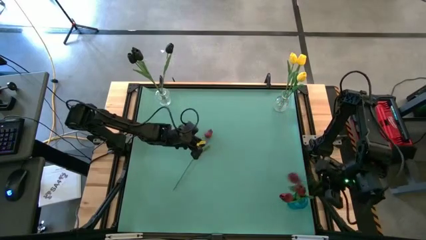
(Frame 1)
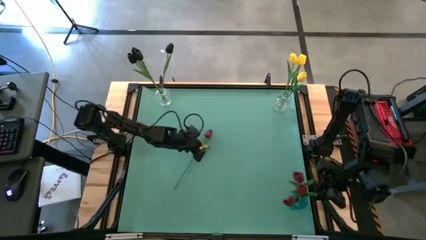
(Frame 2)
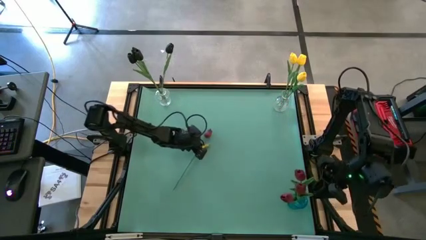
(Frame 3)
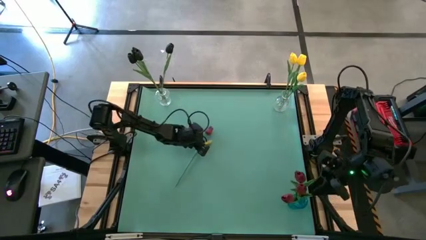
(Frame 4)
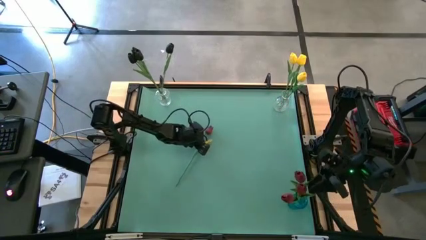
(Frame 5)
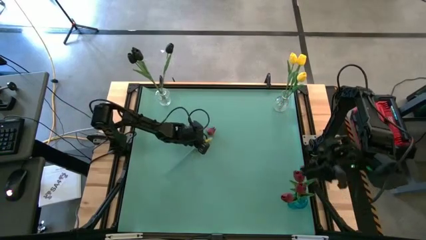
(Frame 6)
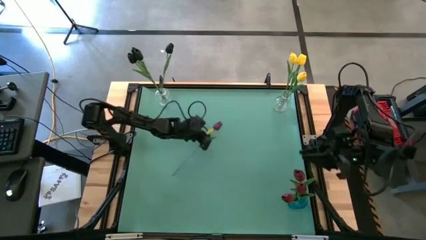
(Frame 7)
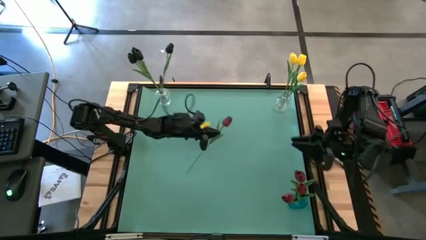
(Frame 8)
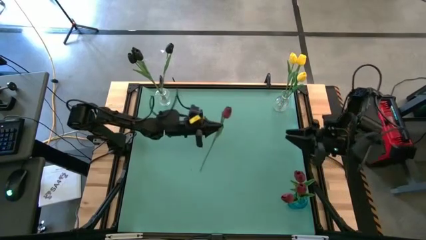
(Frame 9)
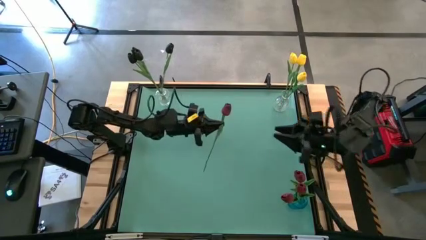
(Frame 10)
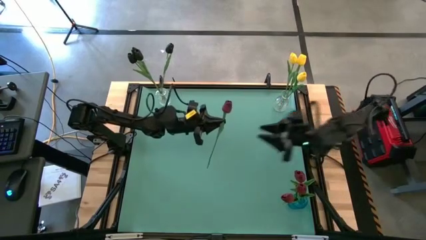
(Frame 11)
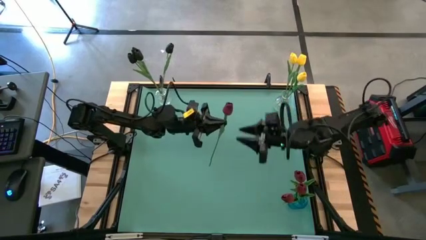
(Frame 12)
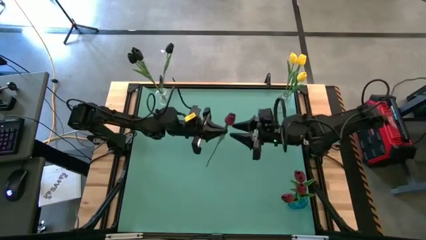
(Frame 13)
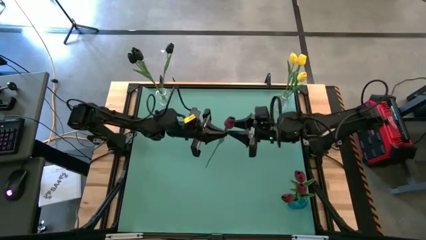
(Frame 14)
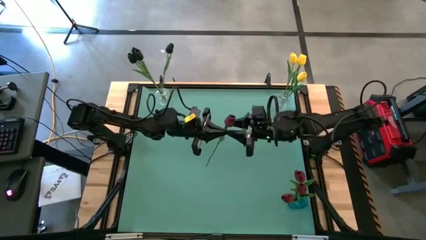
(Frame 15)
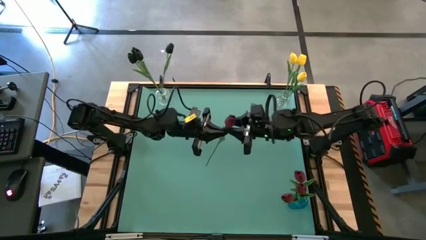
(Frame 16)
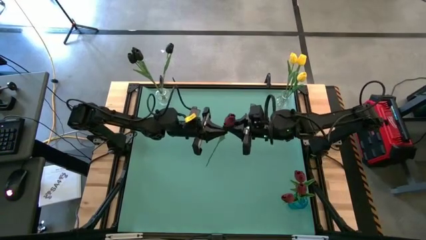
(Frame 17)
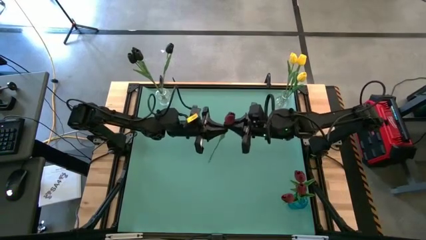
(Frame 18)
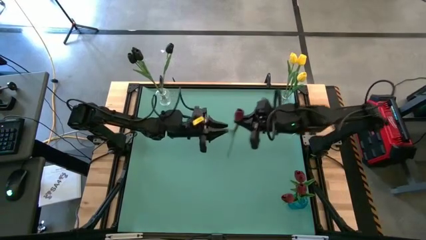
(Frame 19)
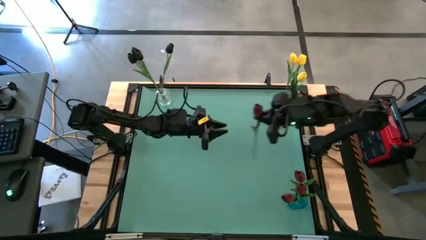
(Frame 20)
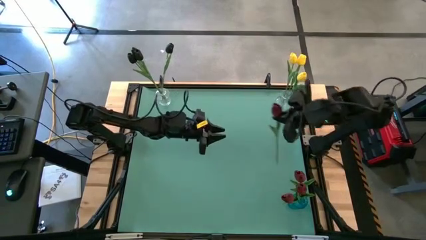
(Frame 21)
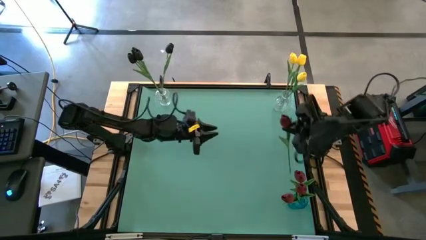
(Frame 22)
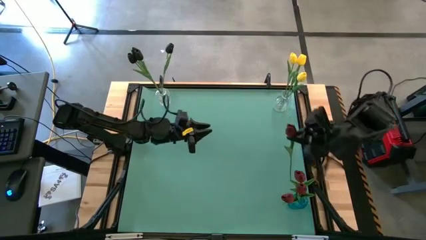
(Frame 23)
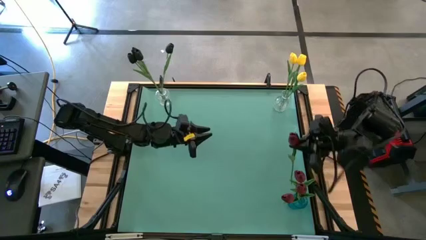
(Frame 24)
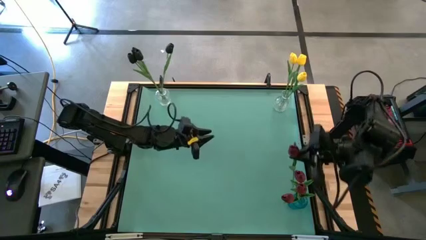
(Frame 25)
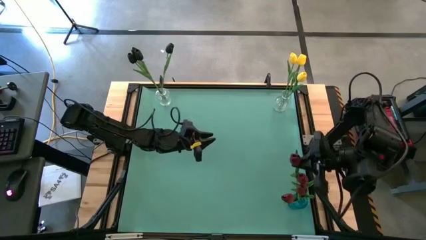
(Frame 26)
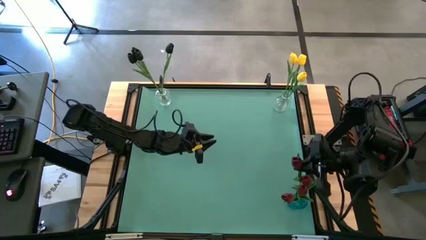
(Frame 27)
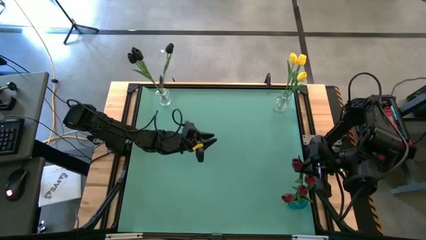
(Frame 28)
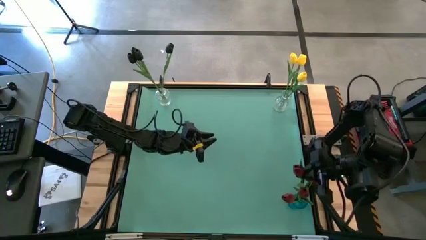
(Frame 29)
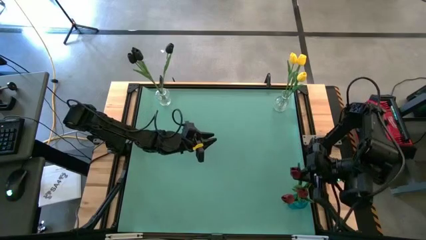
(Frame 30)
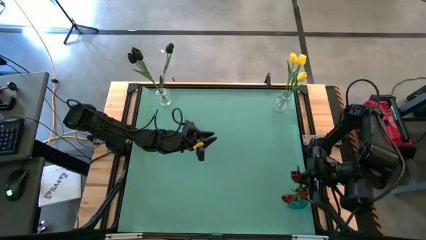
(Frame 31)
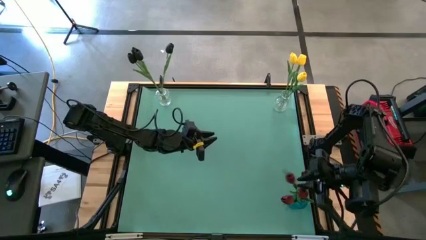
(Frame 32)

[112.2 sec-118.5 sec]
Task: Sort flowers into vase by color
Put the red flower into the blue vase

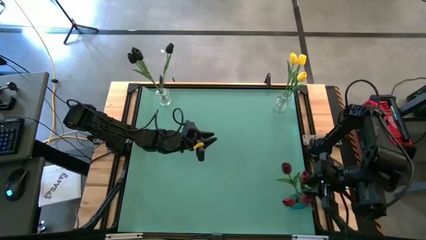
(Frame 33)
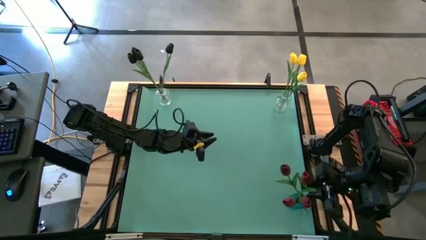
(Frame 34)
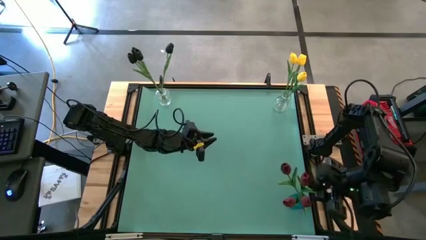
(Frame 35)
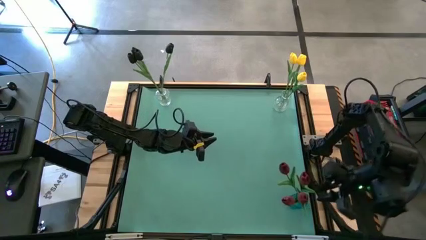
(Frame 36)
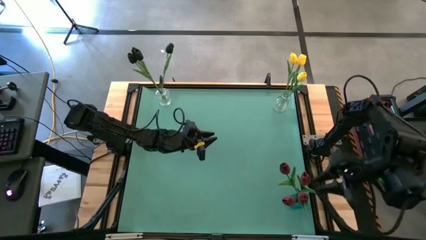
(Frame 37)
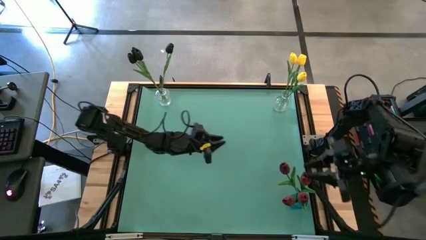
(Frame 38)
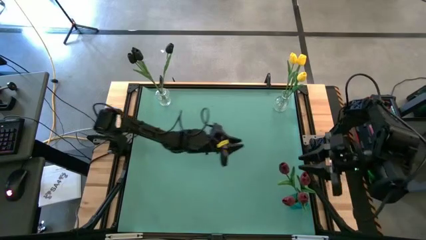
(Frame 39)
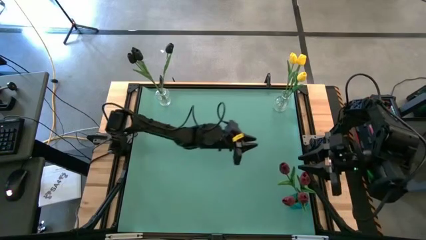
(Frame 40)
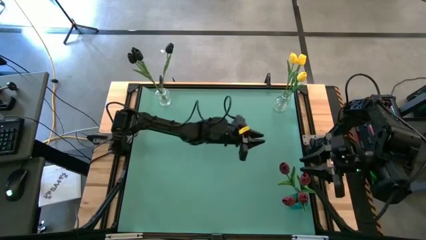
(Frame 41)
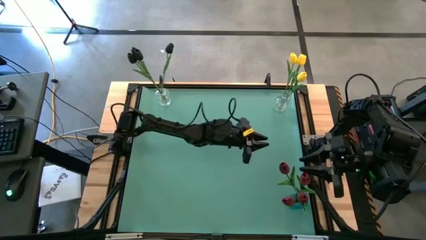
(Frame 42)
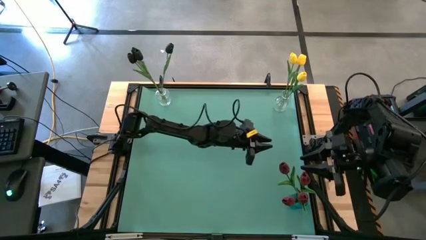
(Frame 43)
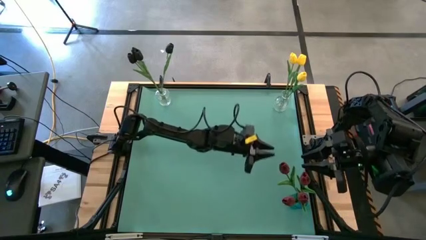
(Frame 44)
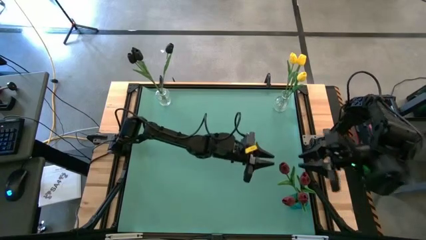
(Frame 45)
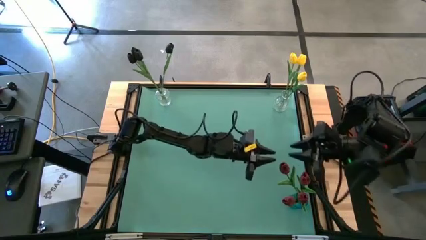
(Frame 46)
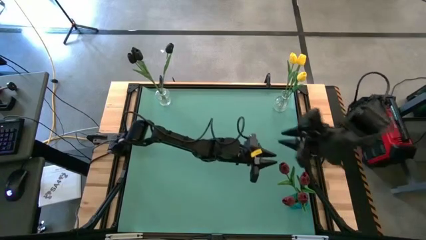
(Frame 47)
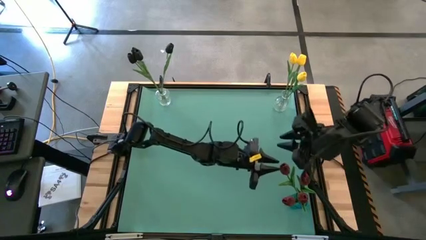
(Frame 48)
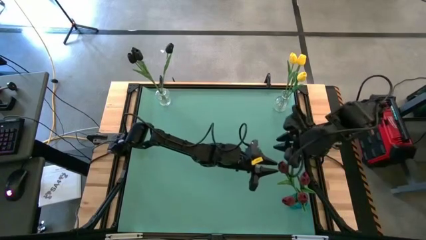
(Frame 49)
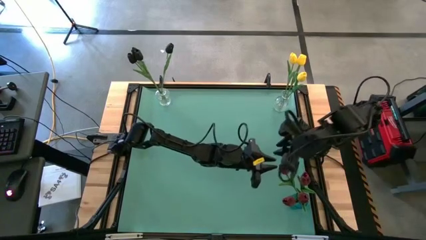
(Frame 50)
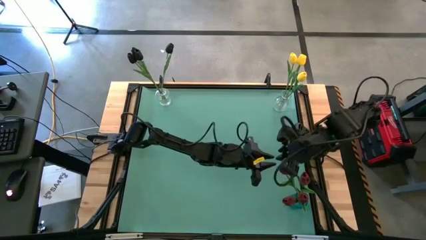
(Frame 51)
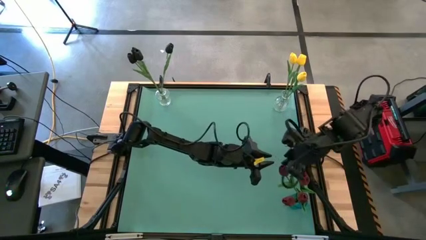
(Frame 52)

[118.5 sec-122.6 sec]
Adjust the red flowers in the blue vase

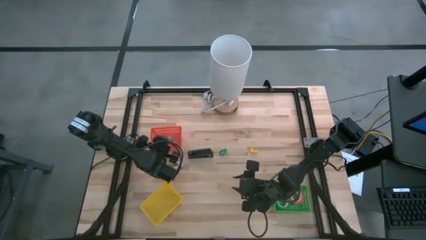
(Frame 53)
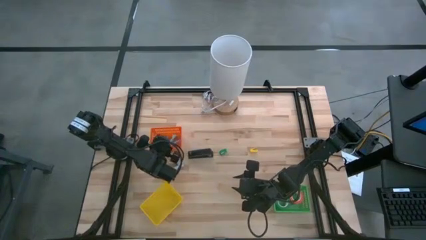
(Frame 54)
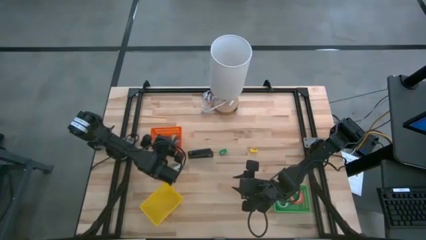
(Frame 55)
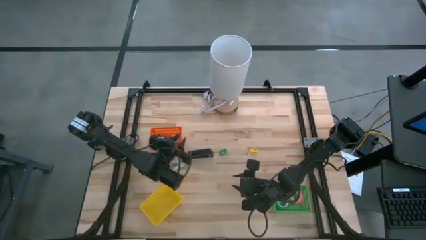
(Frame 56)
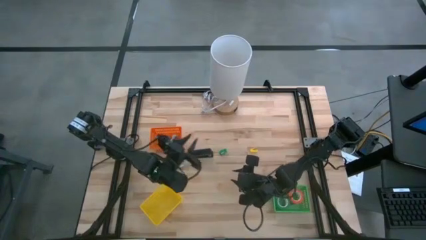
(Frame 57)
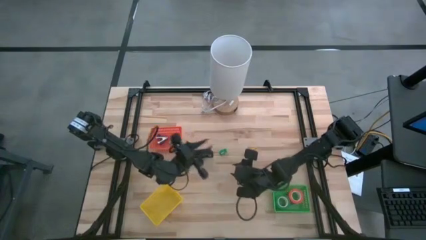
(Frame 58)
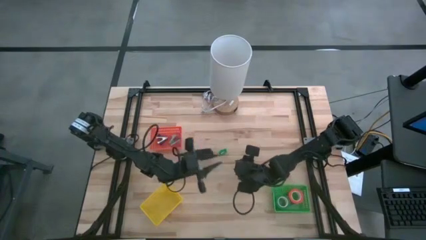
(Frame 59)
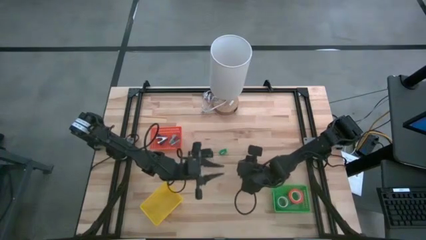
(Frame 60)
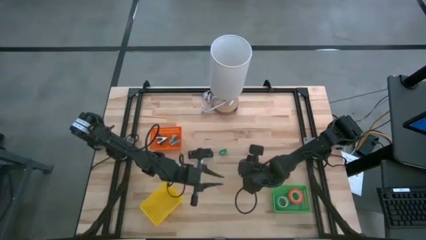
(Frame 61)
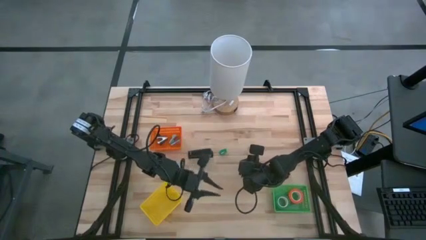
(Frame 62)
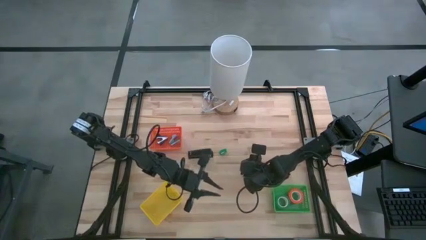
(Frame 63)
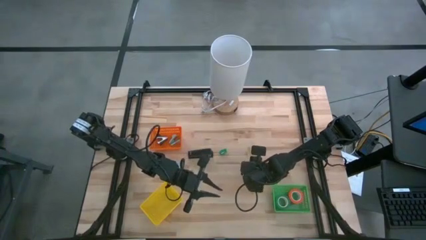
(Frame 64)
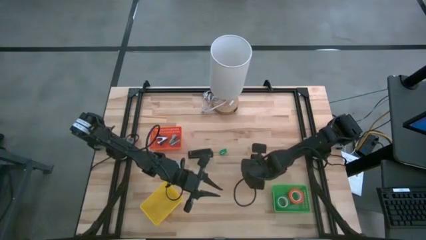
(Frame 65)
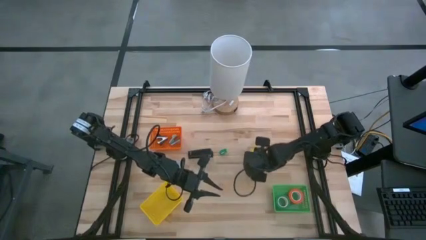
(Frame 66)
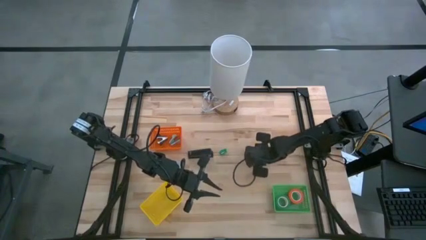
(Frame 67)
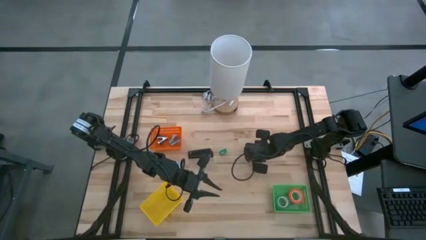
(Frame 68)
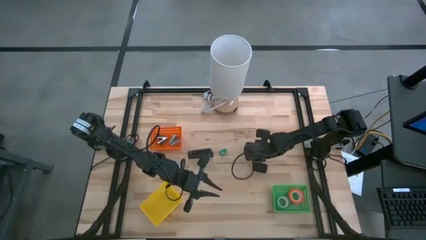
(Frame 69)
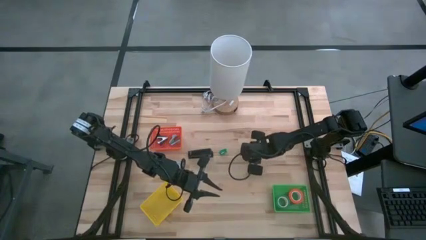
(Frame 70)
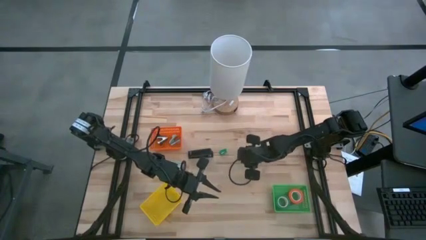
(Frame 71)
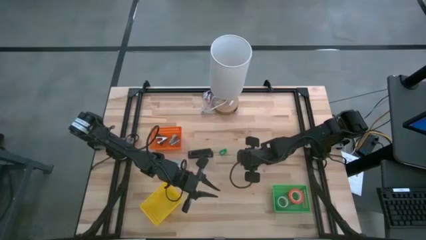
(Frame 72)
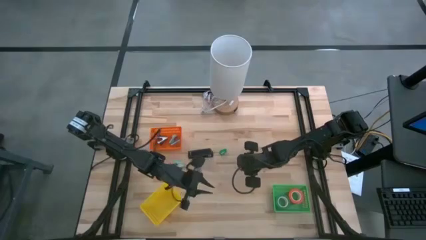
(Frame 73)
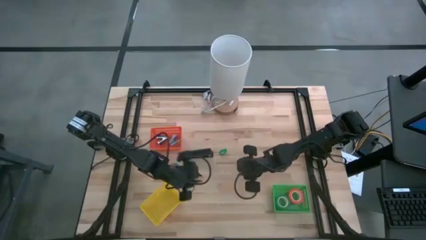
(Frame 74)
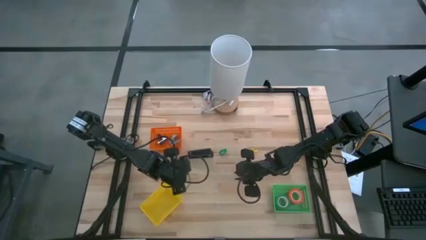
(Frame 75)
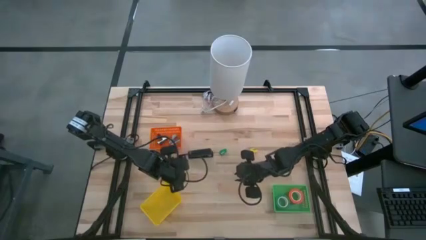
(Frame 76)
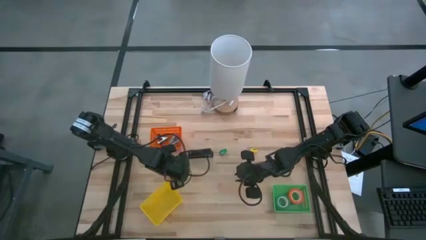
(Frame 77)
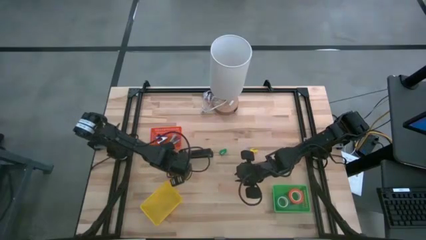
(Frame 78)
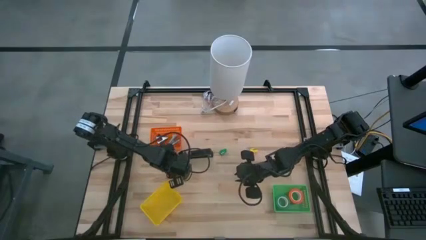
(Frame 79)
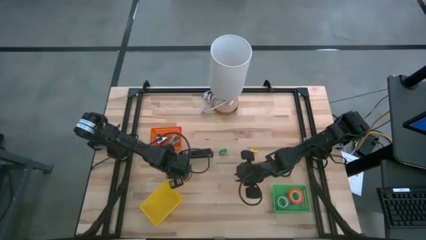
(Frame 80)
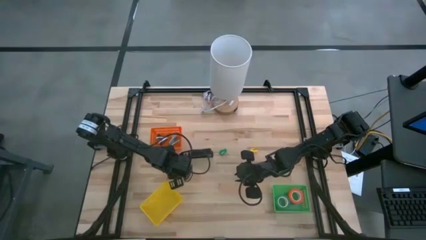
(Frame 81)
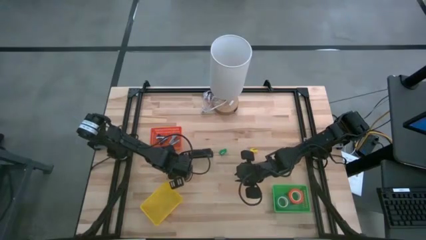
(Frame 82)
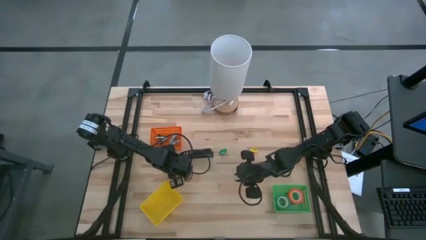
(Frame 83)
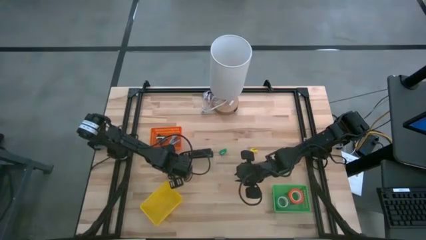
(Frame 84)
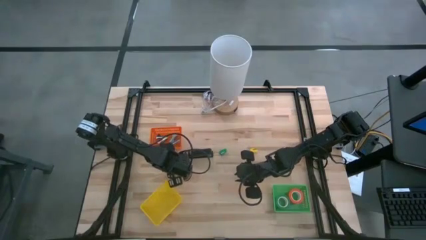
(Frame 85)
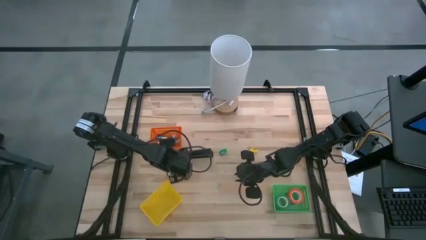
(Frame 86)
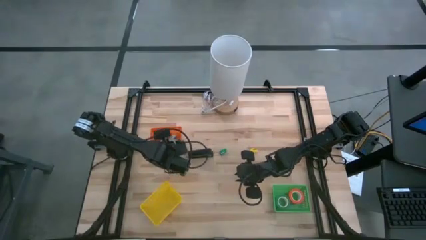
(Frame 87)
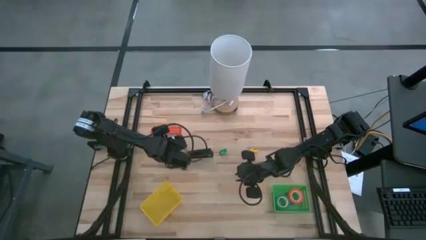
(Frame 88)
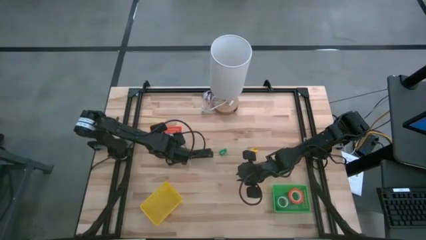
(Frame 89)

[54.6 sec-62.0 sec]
Task: Pick and place Stapler, Stapler remover, tape
Put the blue staple remover into the orange bin
